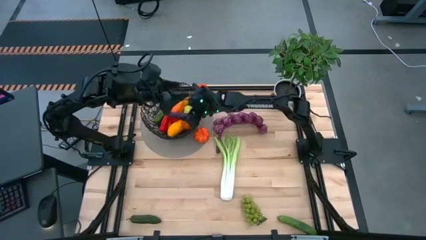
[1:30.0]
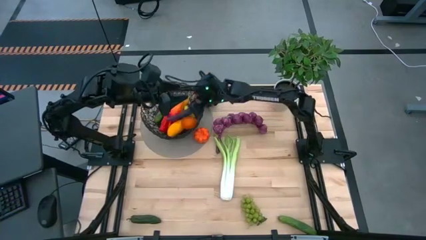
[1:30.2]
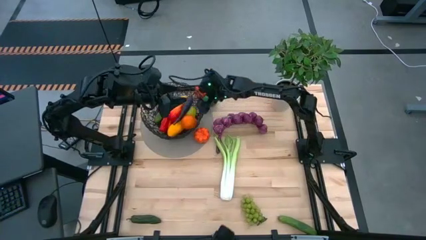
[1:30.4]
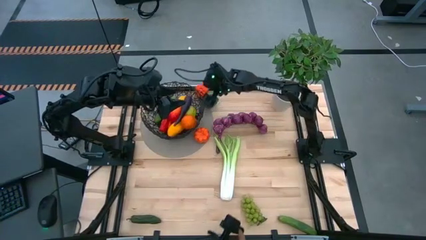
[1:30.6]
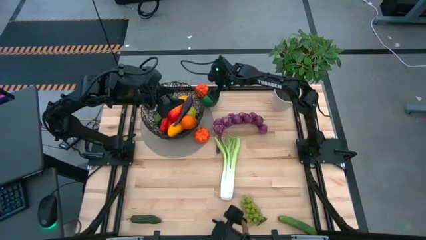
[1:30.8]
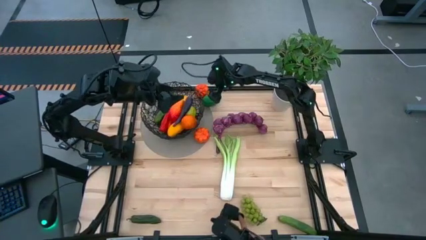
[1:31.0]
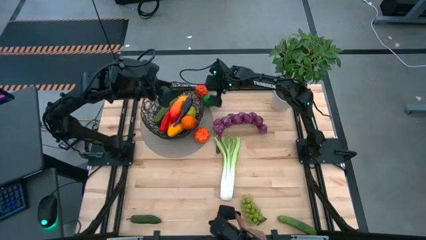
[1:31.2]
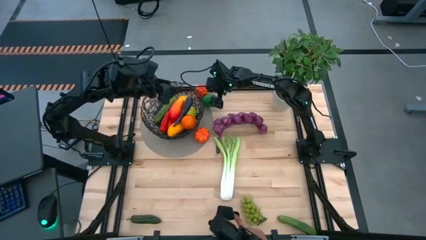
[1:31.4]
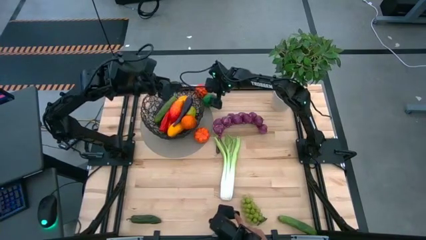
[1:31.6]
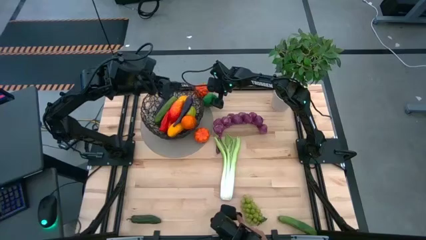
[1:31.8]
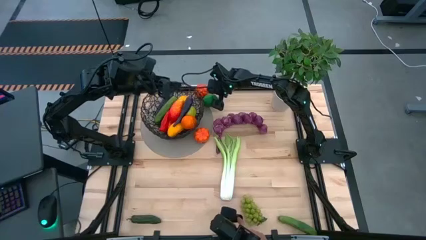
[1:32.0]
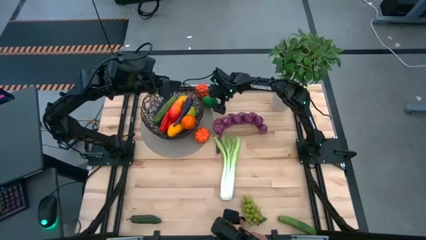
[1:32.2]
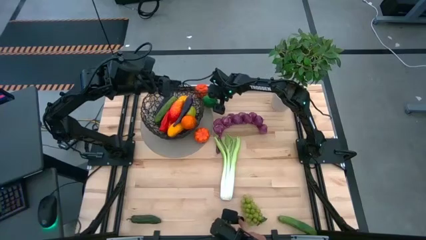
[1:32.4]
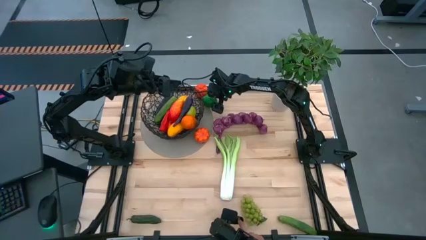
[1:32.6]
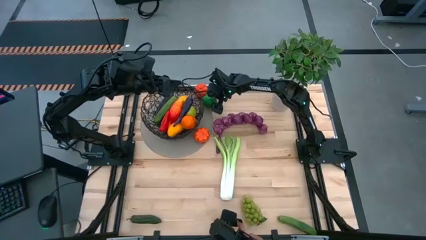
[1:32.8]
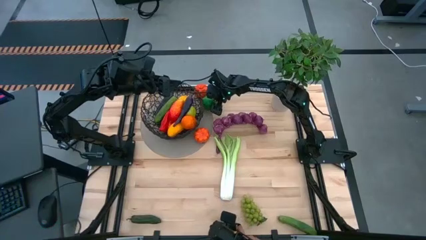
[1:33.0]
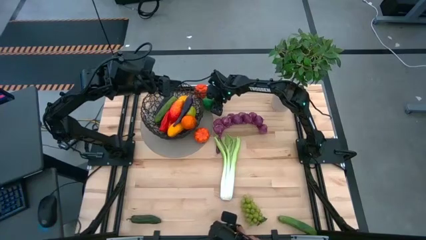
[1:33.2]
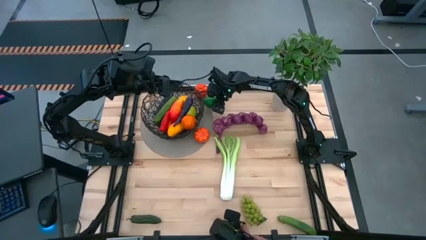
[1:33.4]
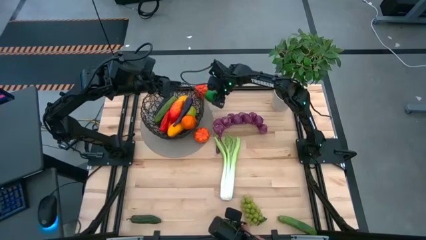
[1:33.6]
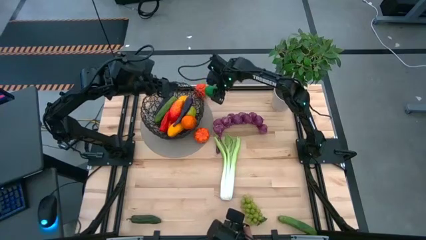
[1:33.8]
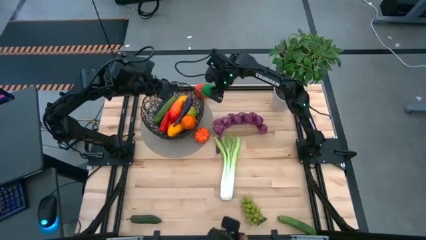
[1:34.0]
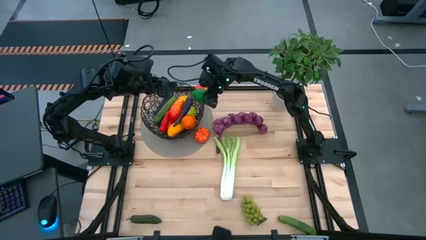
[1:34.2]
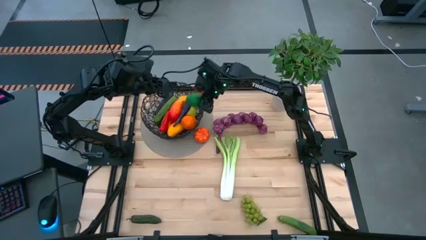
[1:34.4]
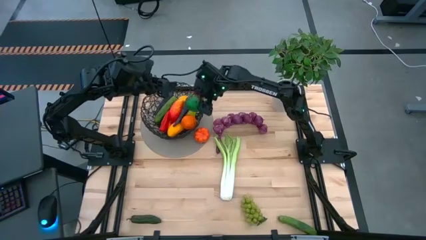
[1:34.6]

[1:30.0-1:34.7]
Task: Build produce basket
Put the green lime into the wire basket

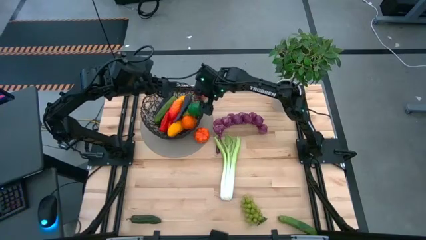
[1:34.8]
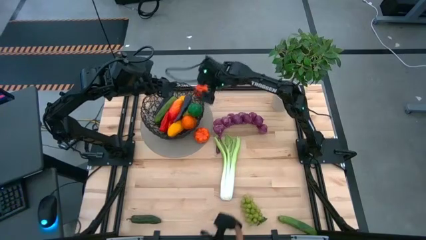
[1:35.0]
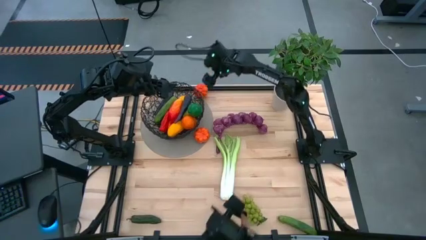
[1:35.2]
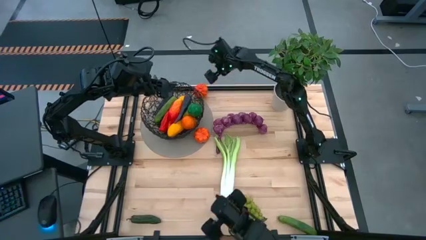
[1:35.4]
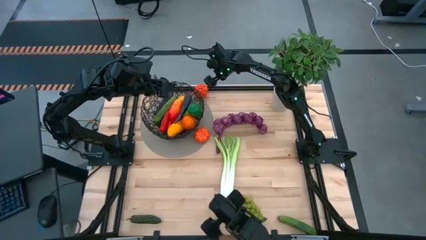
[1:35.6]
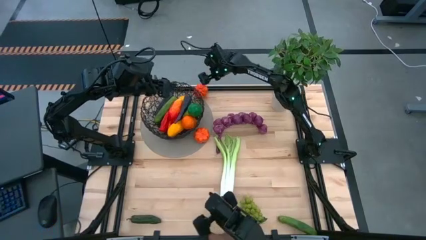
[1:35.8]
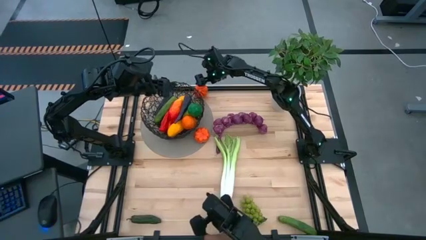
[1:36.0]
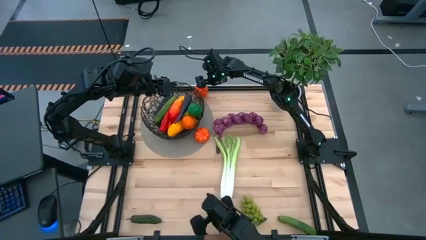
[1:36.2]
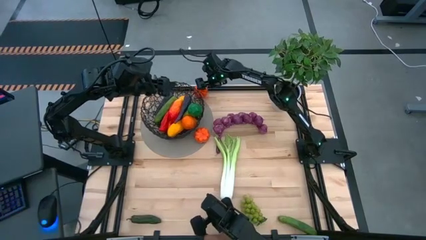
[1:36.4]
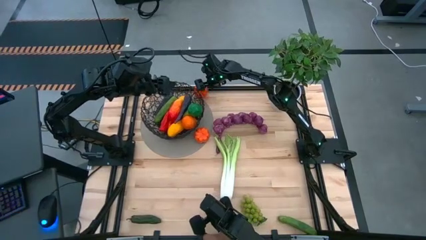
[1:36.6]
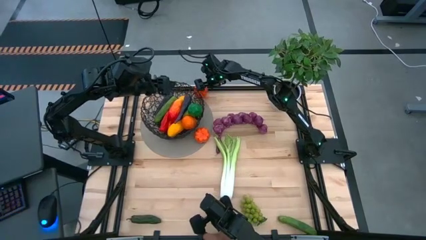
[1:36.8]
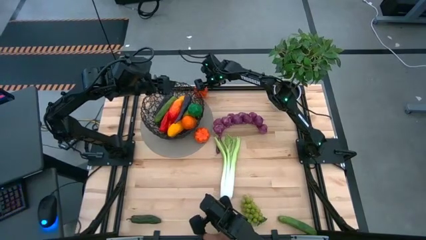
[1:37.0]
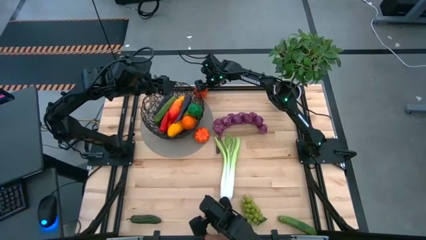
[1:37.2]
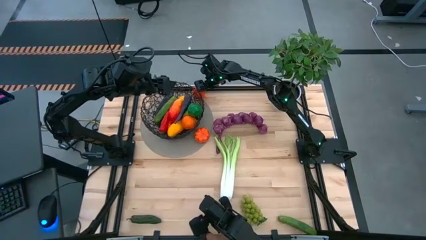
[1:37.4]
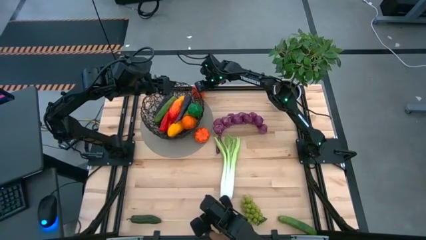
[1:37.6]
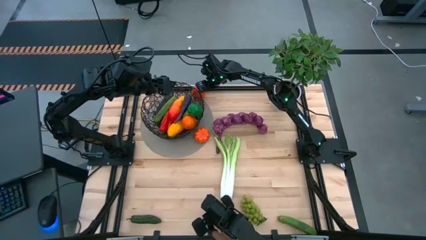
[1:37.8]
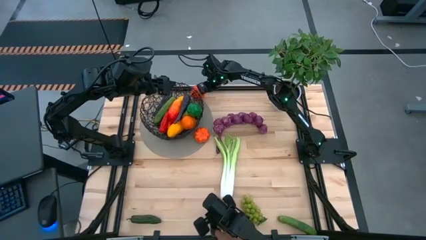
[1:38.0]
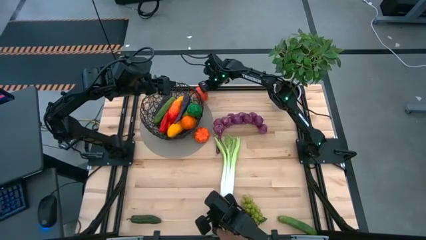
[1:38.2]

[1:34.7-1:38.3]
Put the orange pumpkin into the wire basket

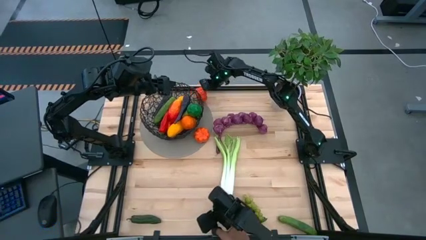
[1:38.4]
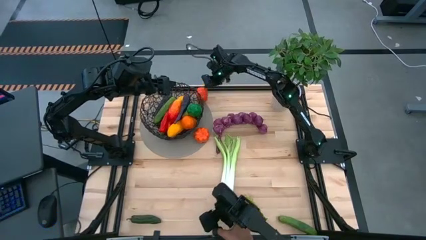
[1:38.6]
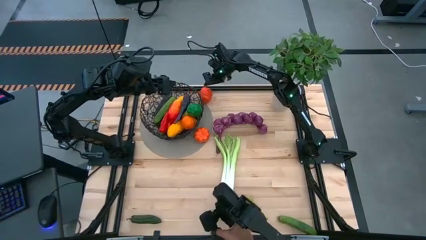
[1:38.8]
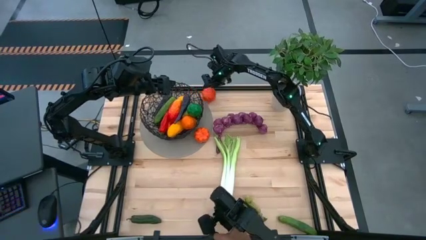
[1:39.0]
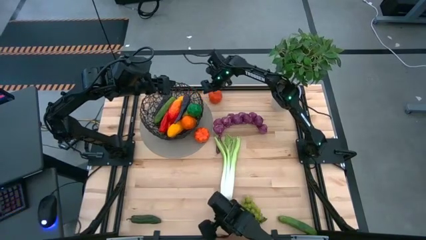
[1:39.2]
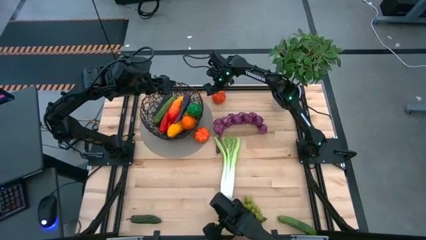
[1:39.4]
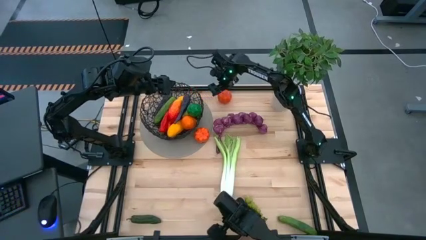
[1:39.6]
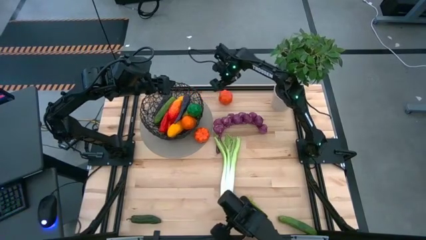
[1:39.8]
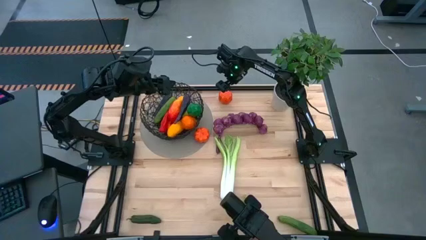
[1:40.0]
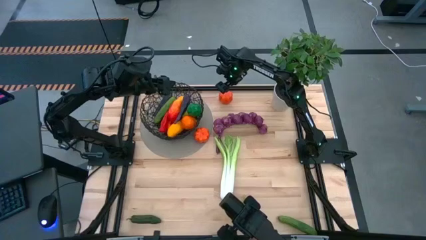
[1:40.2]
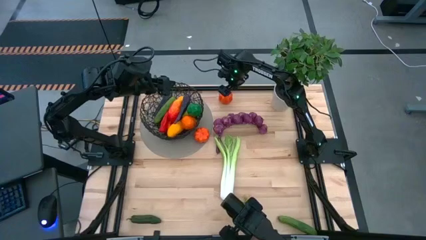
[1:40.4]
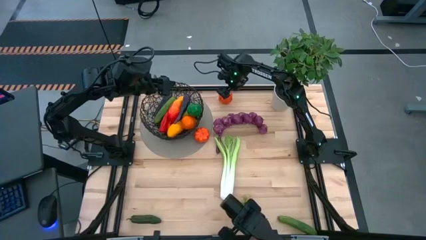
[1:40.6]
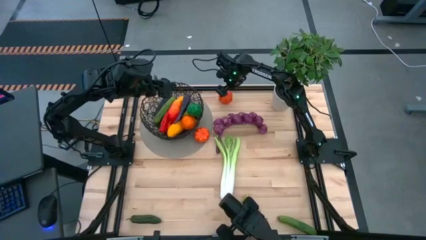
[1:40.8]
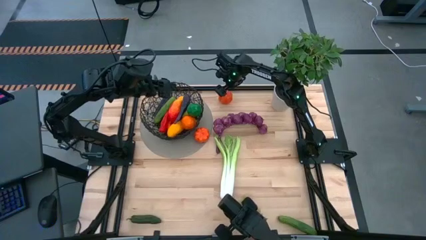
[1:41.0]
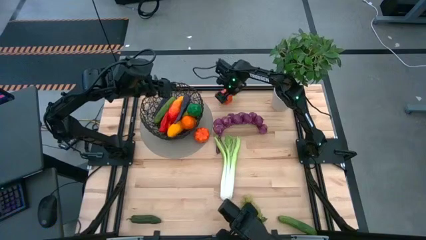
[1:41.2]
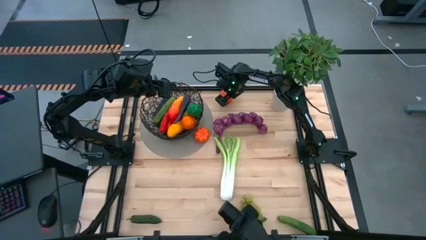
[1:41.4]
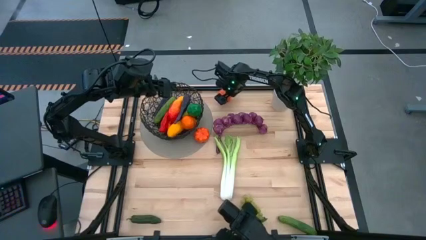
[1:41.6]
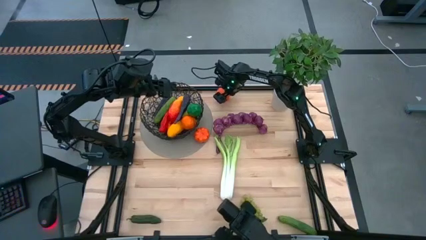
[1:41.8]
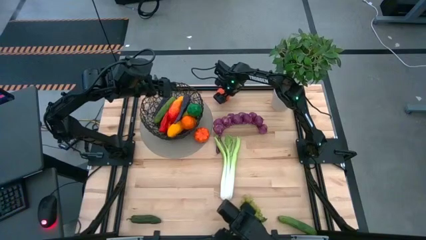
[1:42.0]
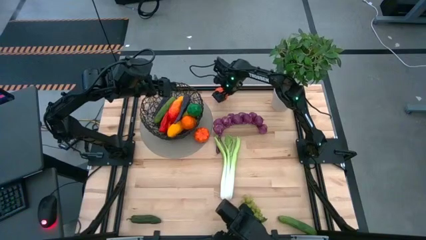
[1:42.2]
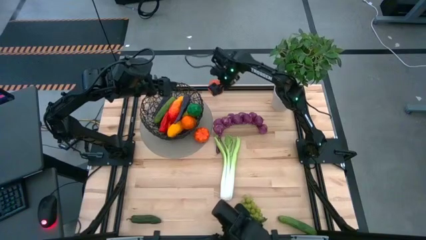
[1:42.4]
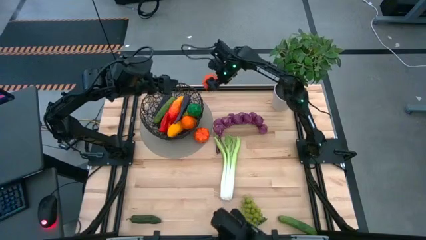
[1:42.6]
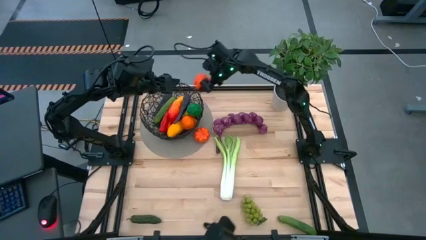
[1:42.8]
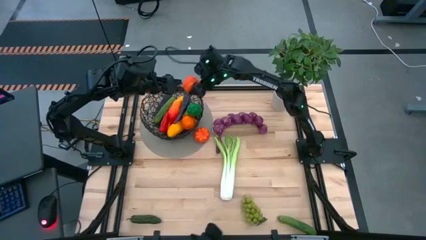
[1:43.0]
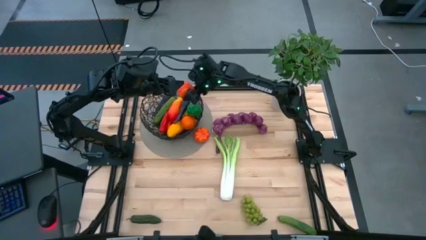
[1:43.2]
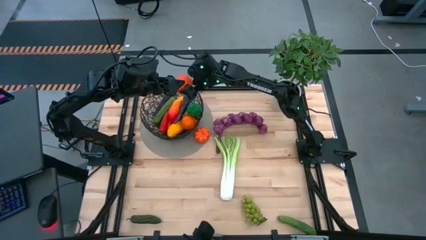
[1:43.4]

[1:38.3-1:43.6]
Put the orange pumpkin into the wire basket

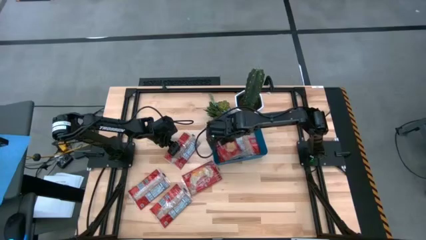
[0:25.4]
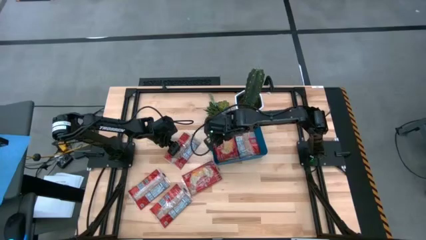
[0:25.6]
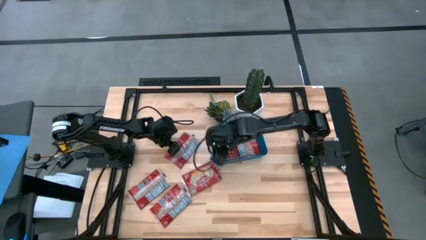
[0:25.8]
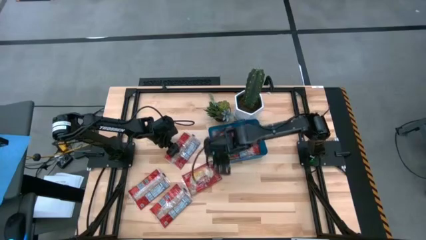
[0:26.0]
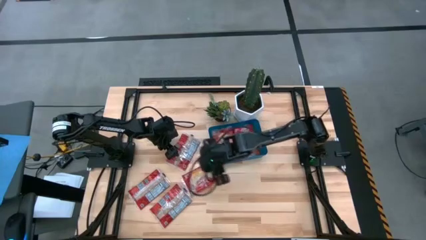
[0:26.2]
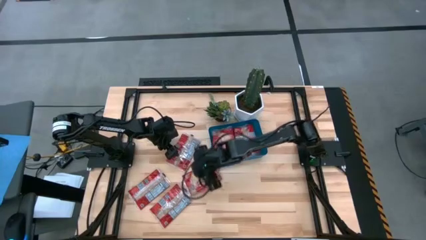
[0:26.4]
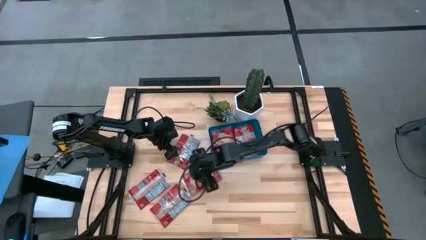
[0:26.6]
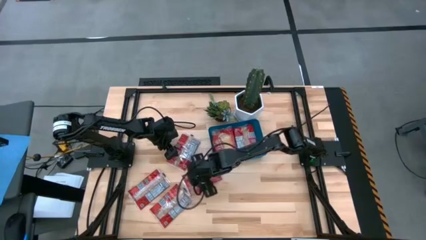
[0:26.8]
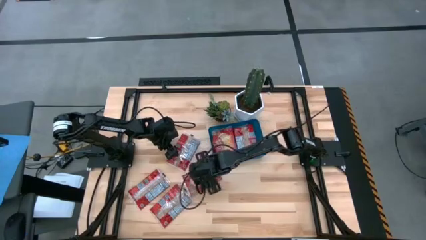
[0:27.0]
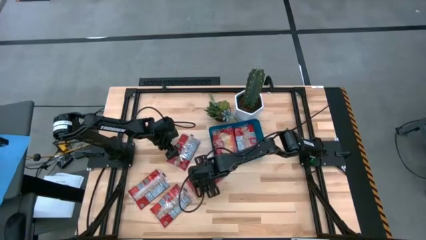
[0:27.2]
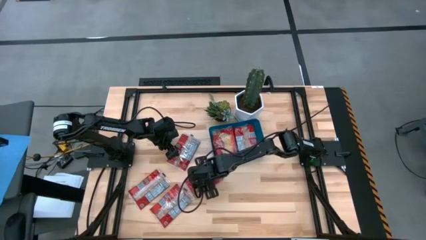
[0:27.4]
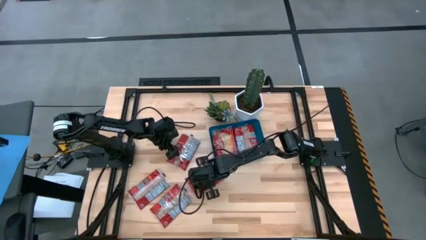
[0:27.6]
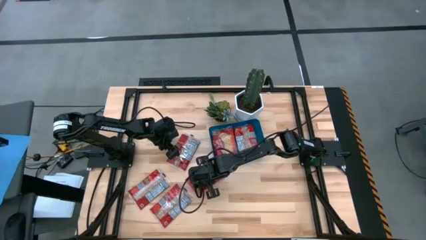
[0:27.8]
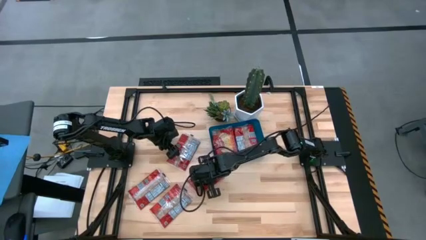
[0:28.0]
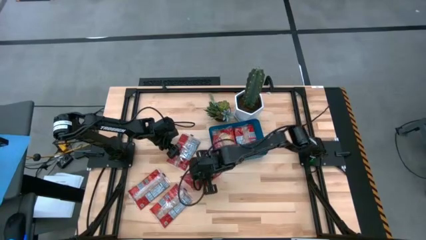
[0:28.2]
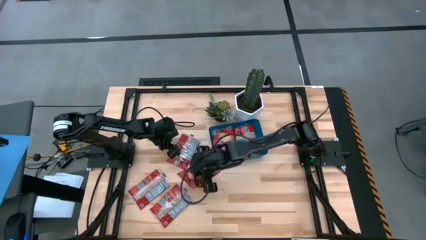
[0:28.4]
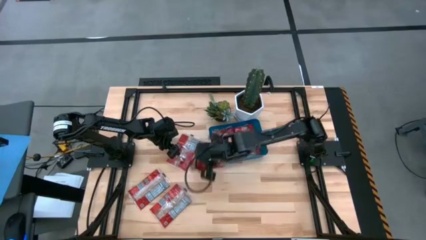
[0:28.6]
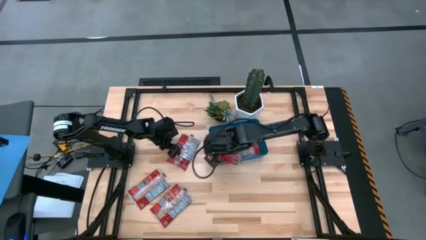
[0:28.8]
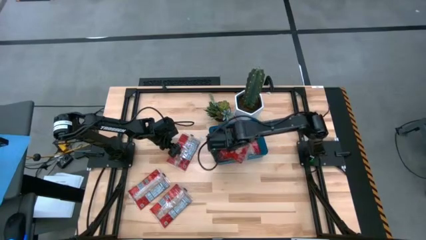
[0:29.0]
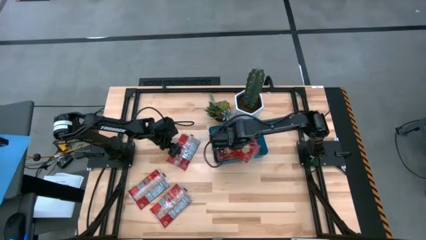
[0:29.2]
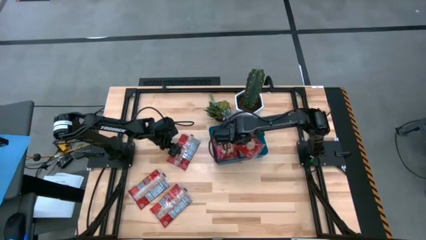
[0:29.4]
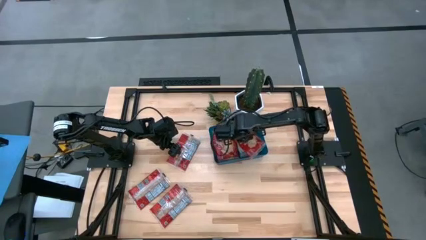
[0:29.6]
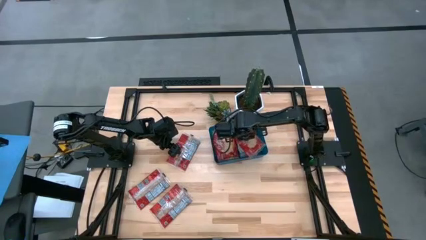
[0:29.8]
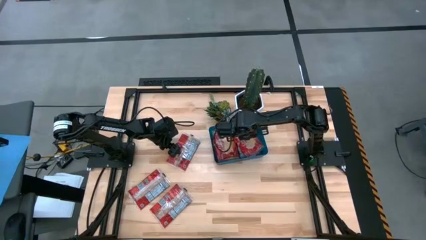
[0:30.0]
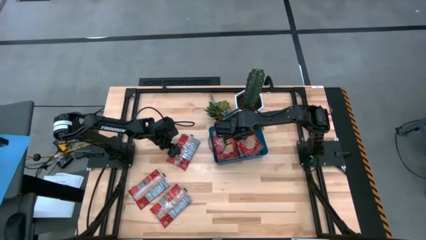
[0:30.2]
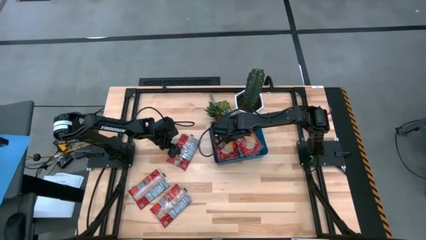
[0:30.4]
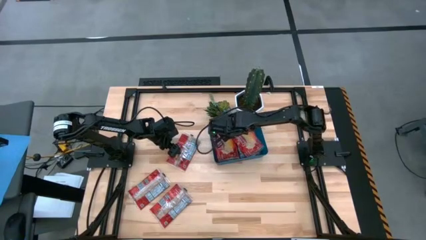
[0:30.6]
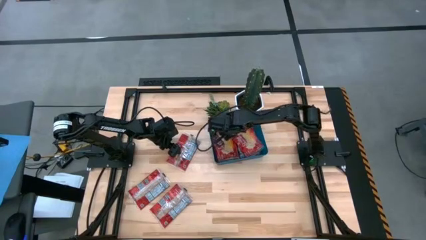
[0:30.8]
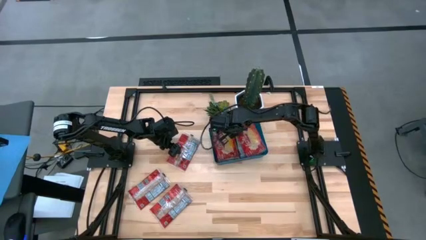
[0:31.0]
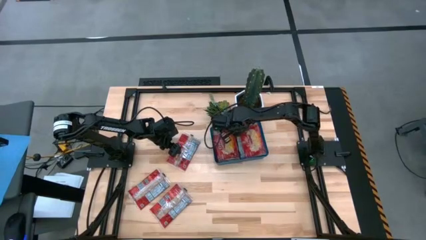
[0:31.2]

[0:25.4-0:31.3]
Task: Sort popcorn bags into baskets
Put the red popcorn bag into the blue container
